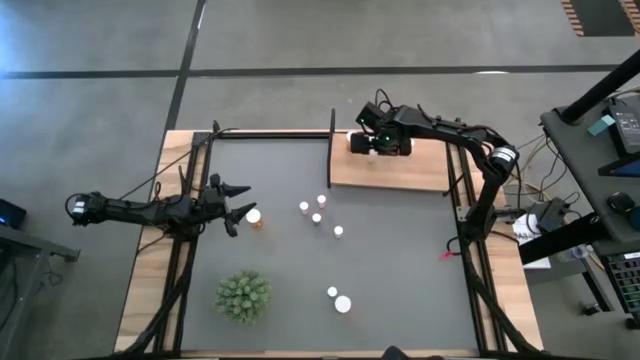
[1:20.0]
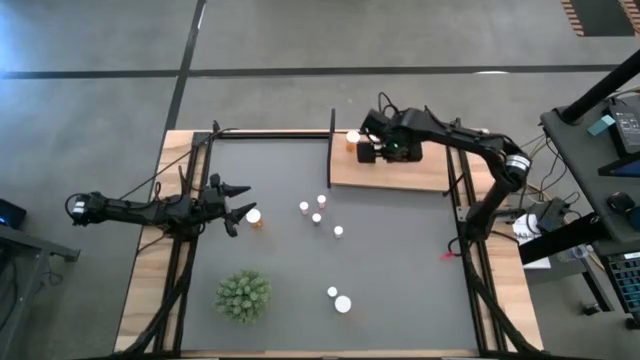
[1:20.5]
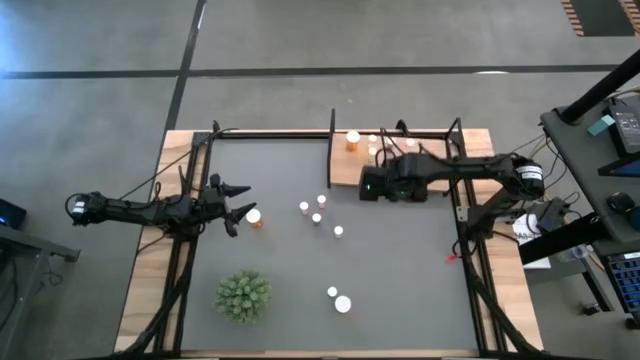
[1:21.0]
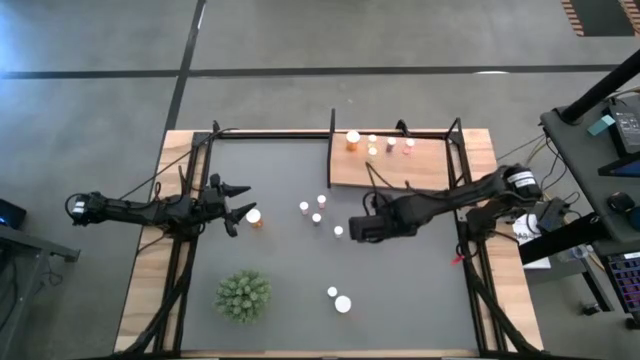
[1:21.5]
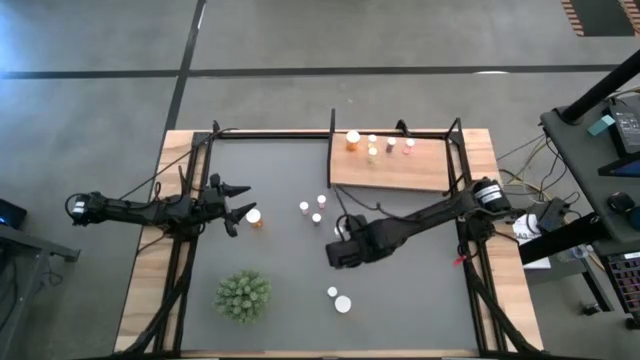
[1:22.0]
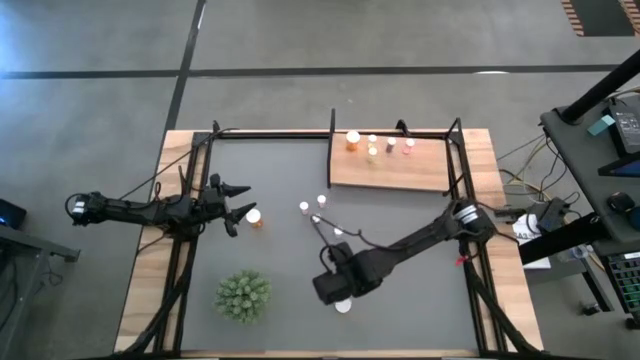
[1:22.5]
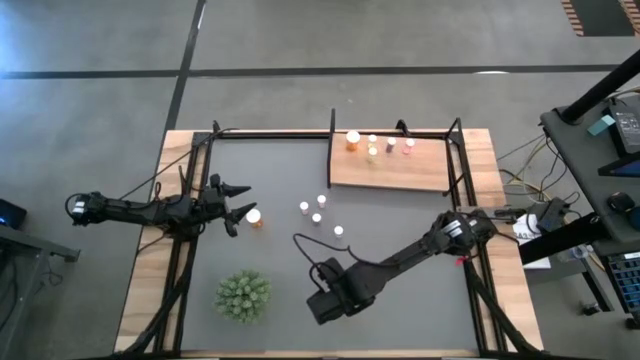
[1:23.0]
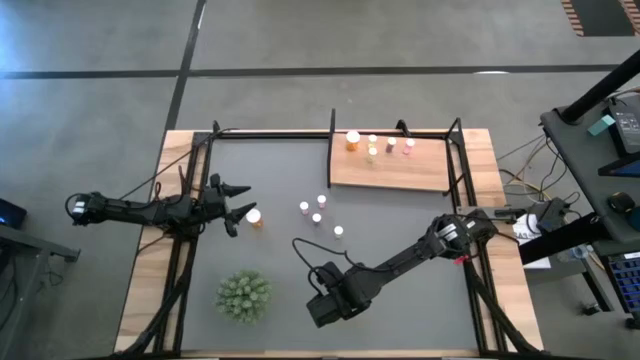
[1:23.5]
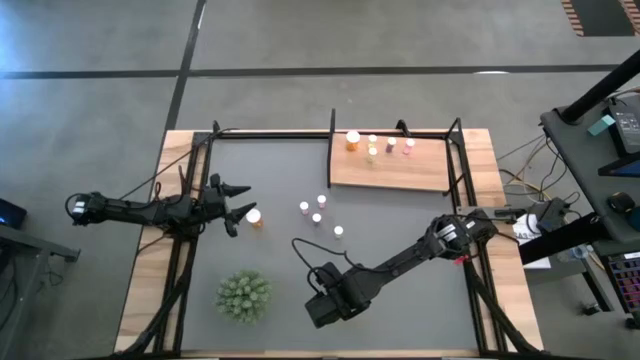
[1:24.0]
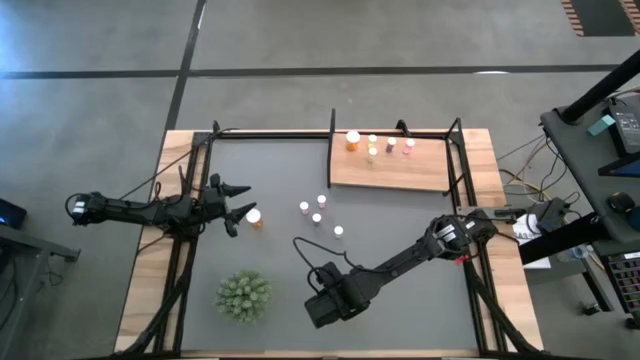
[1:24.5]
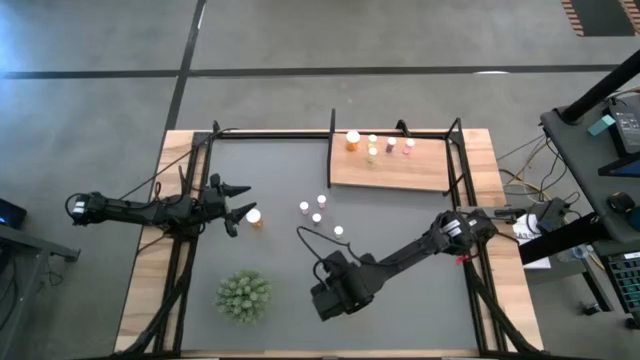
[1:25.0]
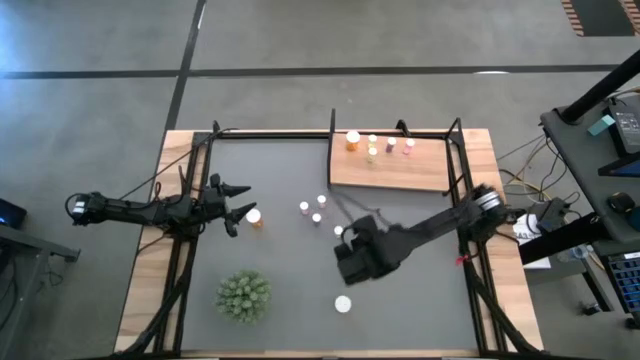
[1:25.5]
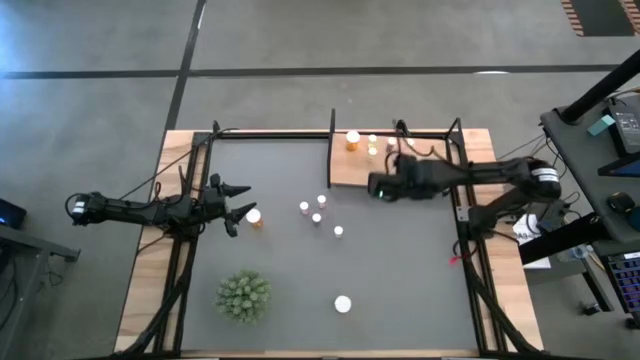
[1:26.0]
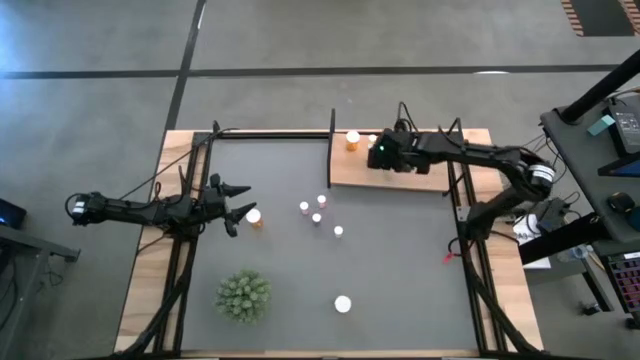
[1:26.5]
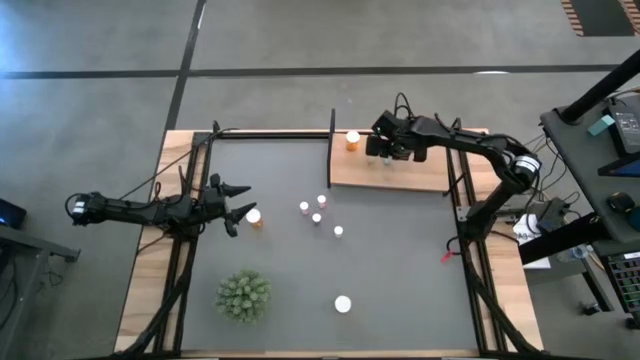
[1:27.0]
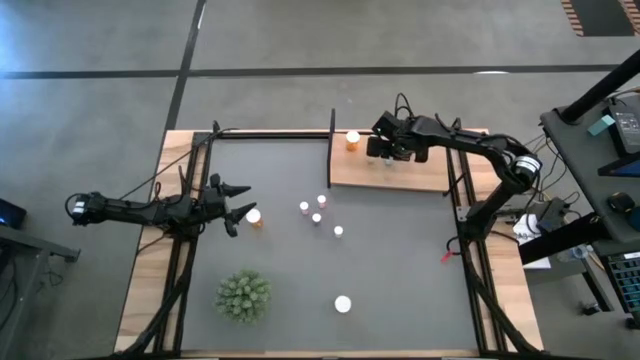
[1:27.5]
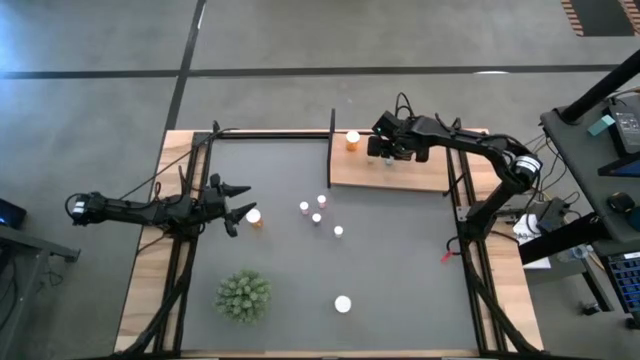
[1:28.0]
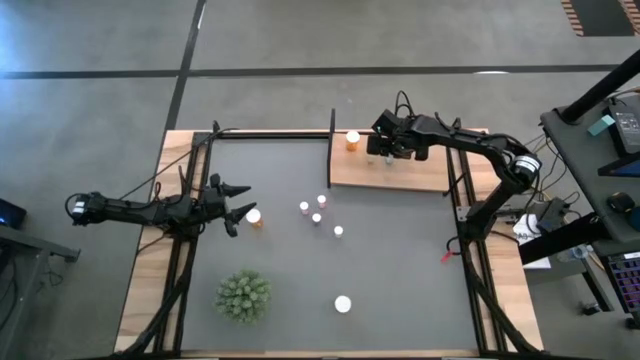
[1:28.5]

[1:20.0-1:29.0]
Task: Pick and place medicine bottles onto shelf by color
Put the bottom blue pill bottle on the shelf aligned with the other blue pill bottle

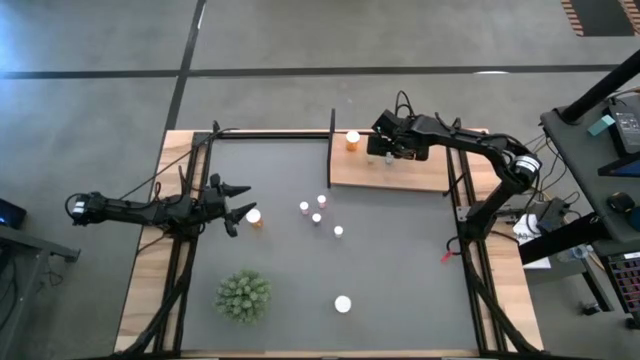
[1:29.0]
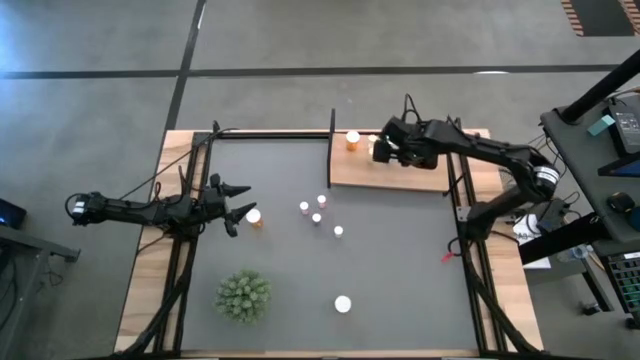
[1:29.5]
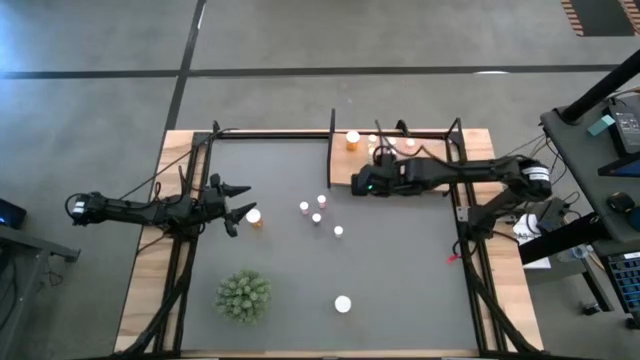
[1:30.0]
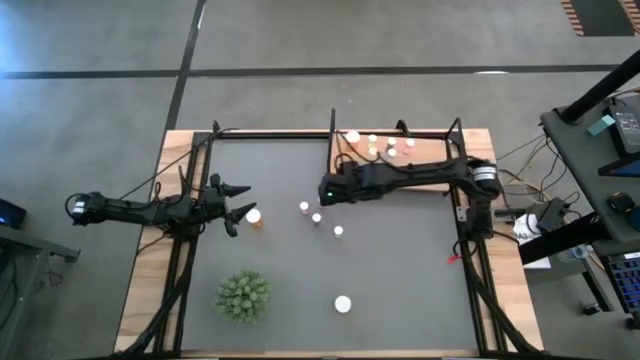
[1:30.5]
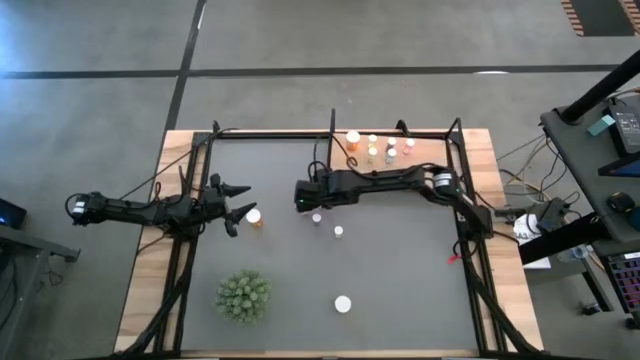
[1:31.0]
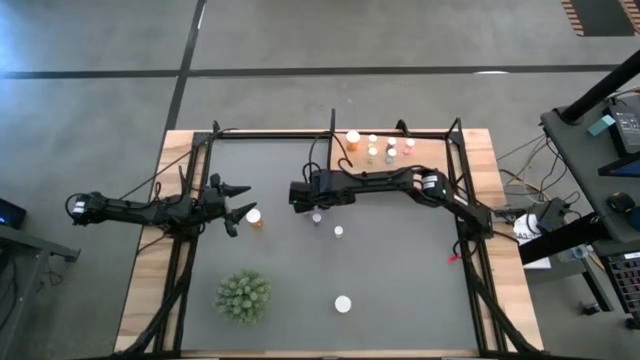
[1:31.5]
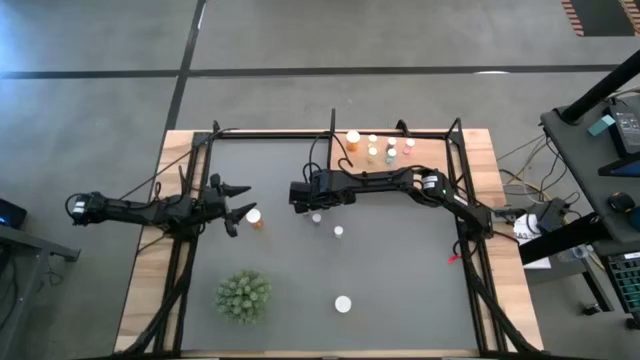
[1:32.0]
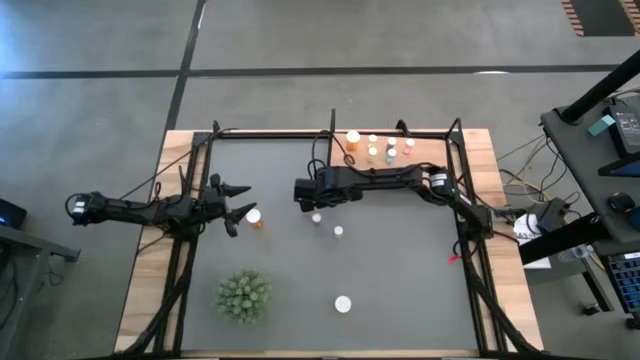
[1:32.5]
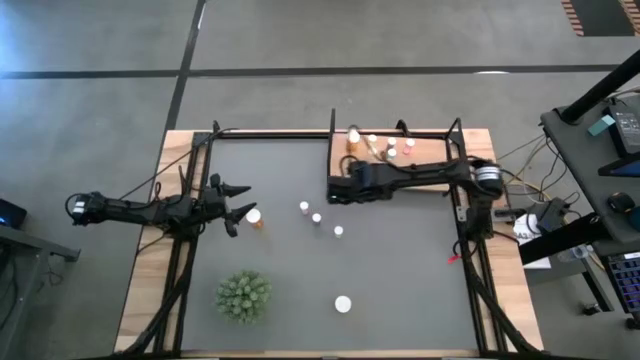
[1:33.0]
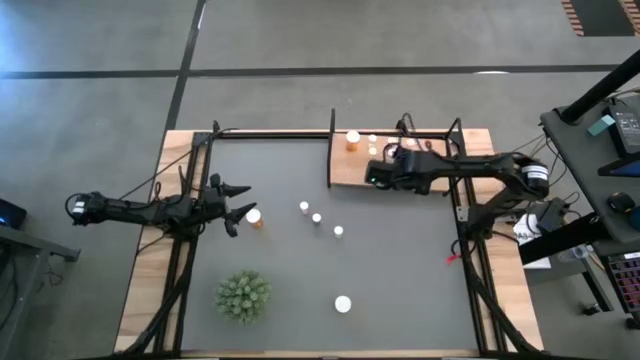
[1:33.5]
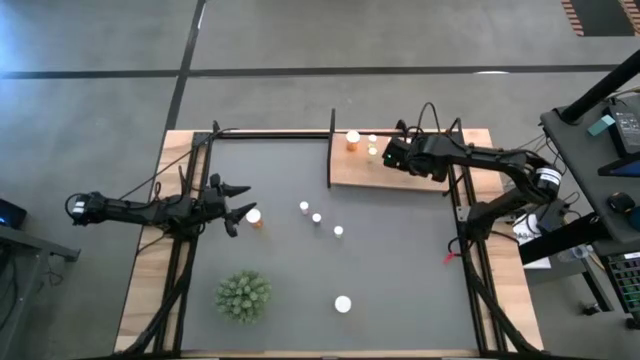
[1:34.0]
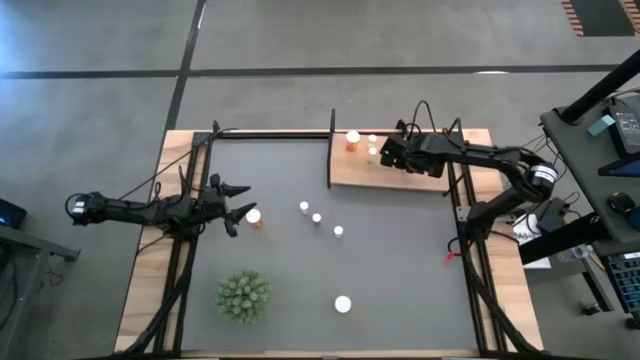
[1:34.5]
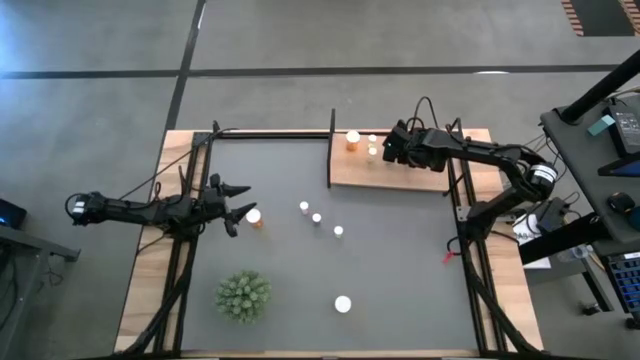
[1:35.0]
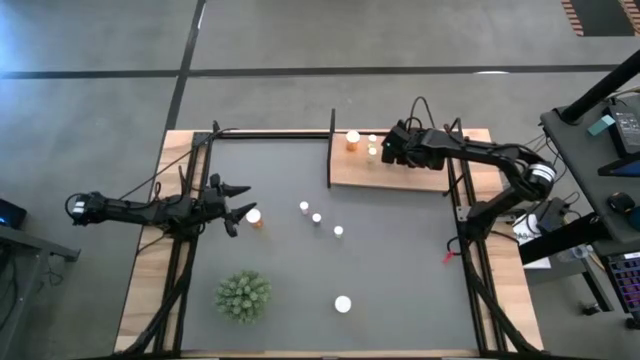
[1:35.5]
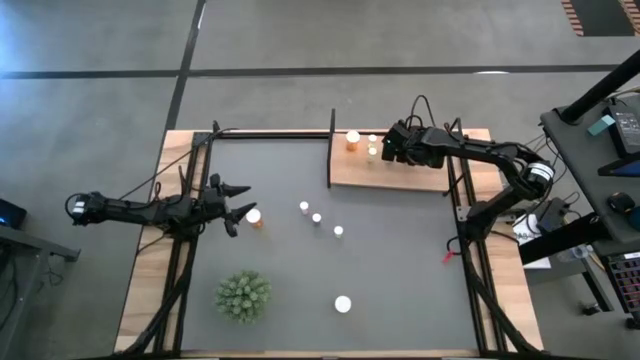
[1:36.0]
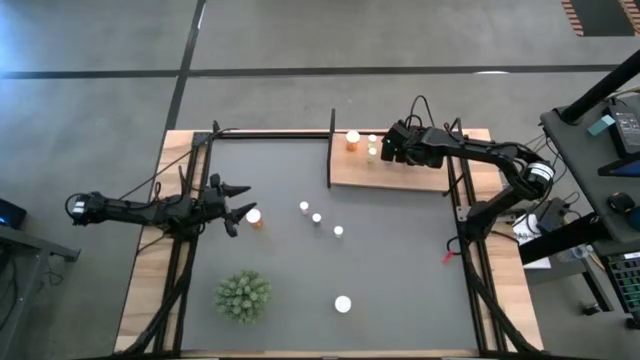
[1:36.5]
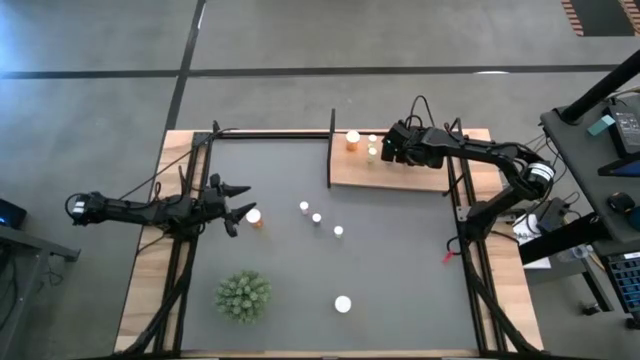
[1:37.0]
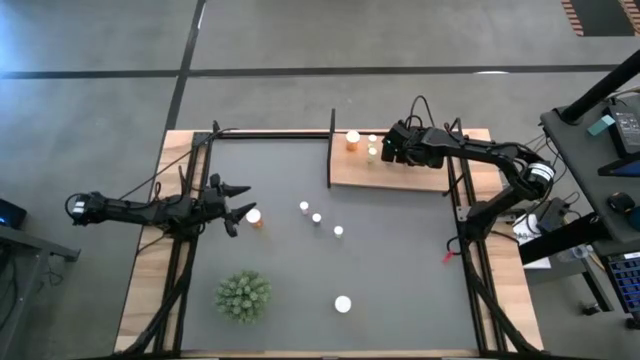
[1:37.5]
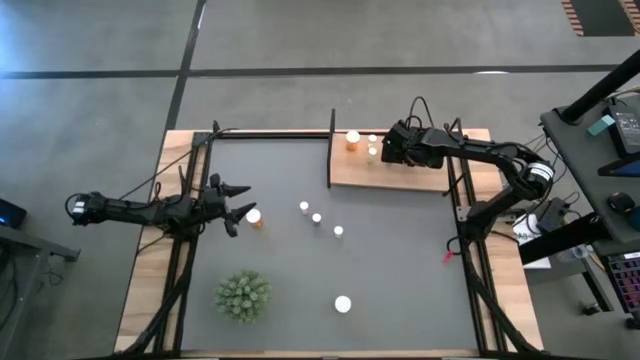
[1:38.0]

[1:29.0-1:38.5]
Put the right pink pill bottle on the shelf aligned with the other pink pill bottle

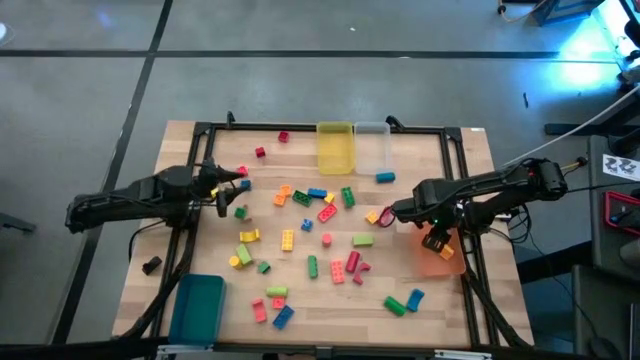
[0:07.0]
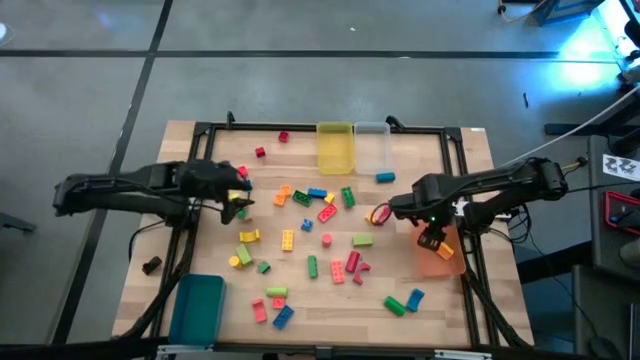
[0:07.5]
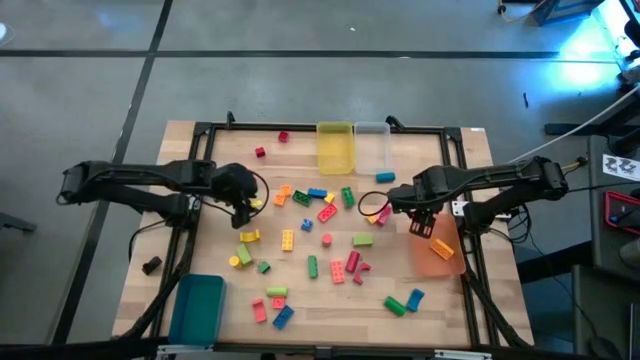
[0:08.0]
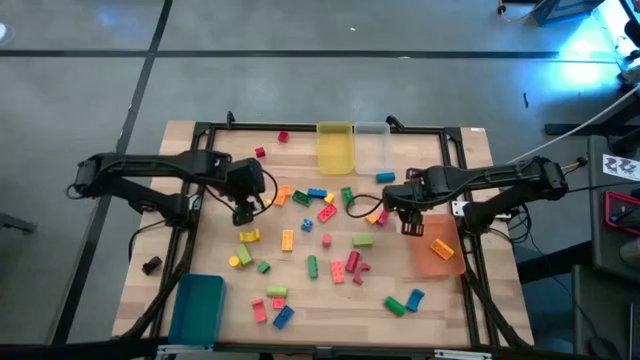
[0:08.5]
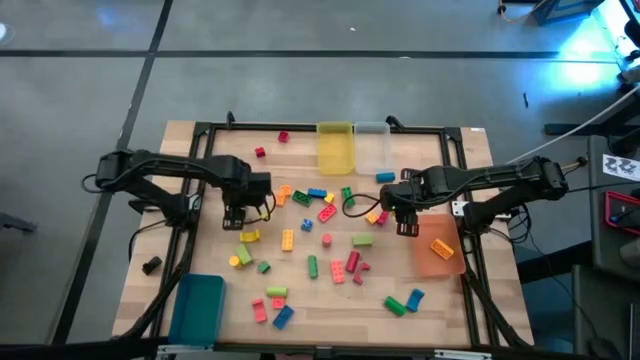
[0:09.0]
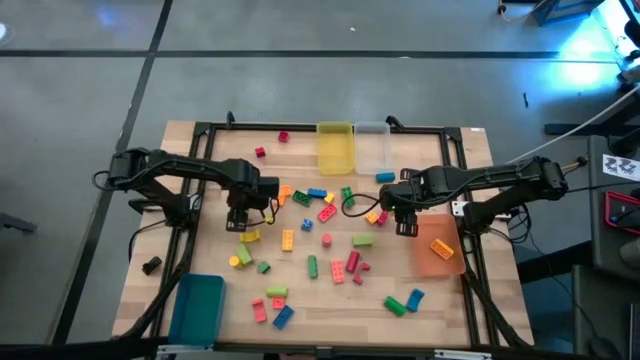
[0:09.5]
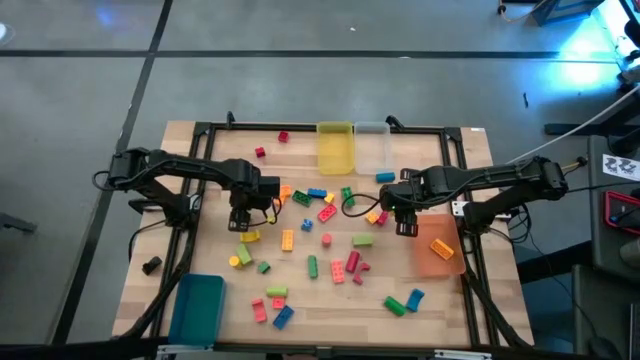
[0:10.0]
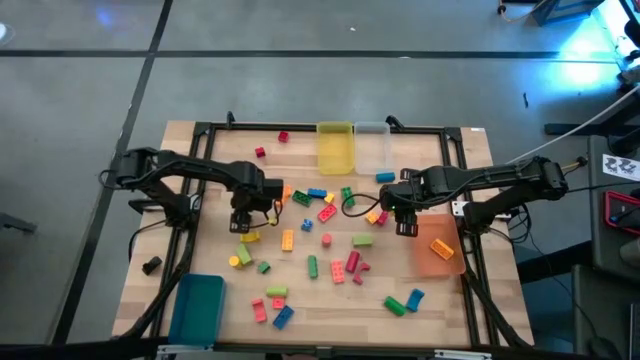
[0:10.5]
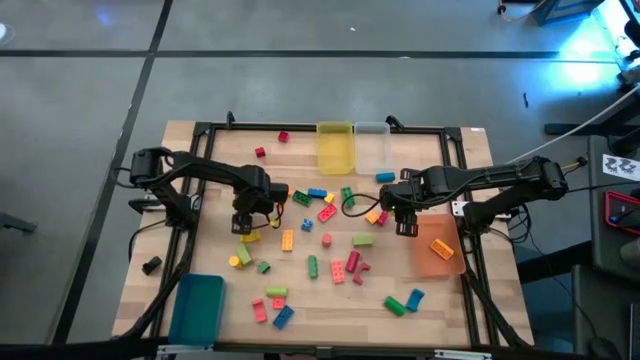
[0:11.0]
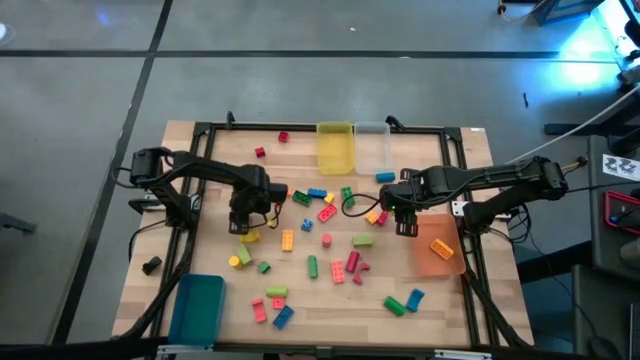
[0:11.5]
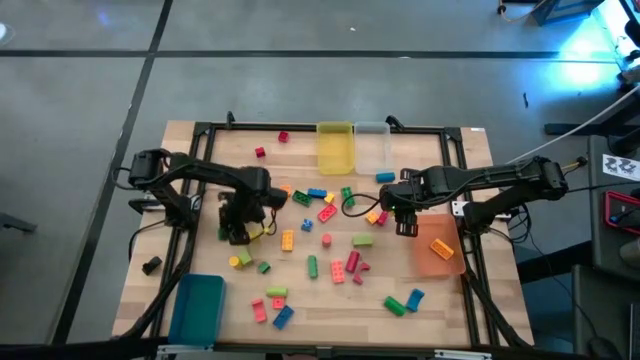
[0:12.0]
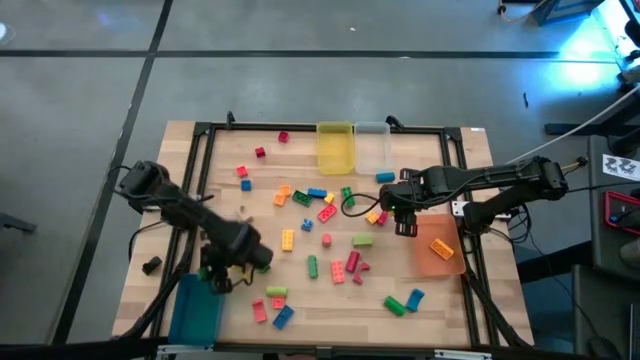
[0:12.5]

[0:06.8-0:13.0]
Task: Sort blocks by size
Put the green square game piece into the blue bin
